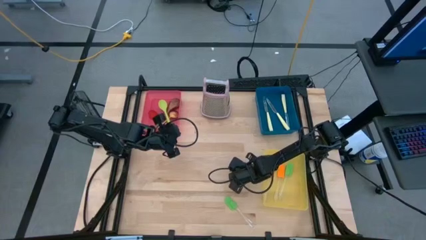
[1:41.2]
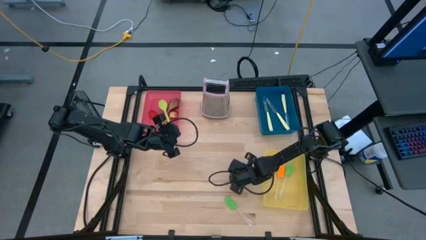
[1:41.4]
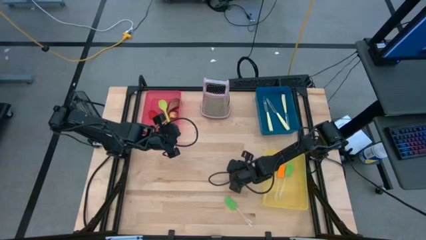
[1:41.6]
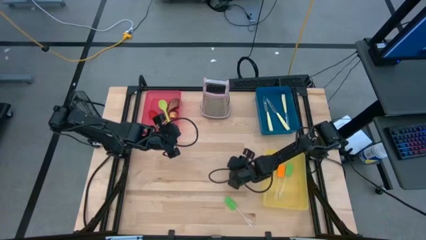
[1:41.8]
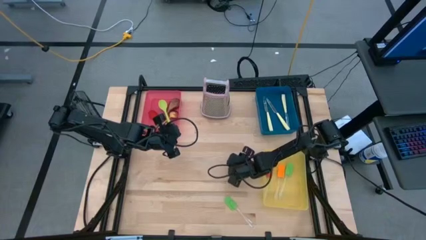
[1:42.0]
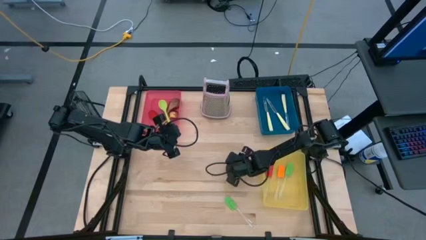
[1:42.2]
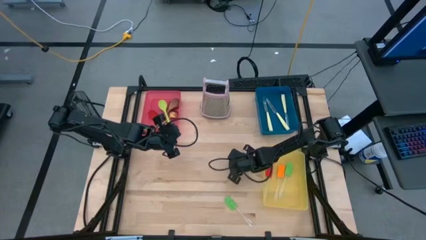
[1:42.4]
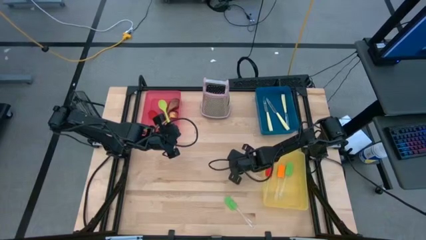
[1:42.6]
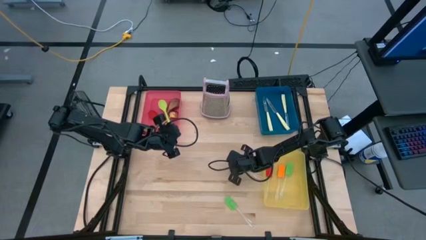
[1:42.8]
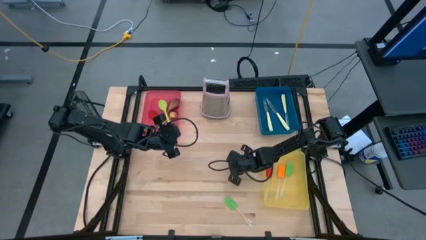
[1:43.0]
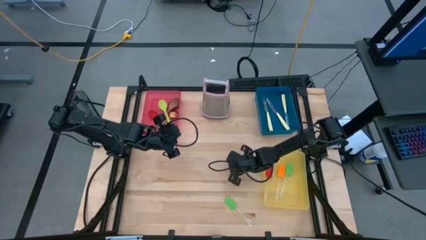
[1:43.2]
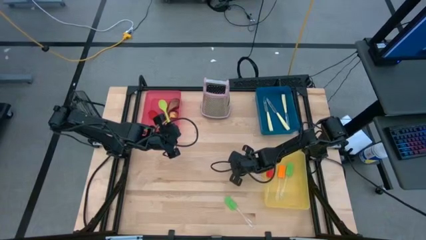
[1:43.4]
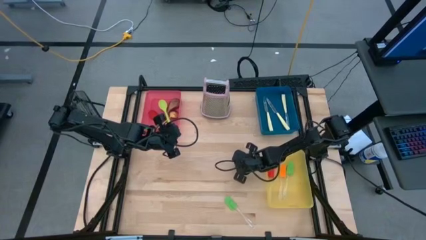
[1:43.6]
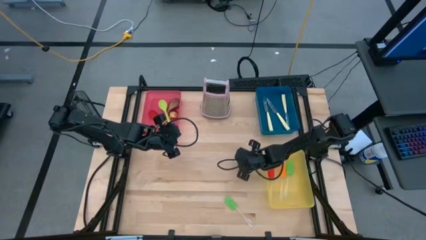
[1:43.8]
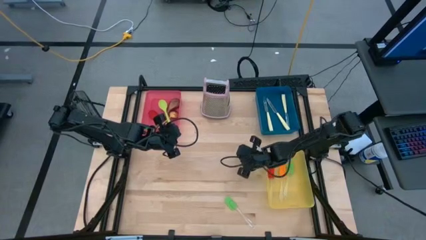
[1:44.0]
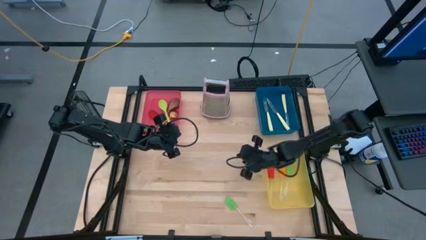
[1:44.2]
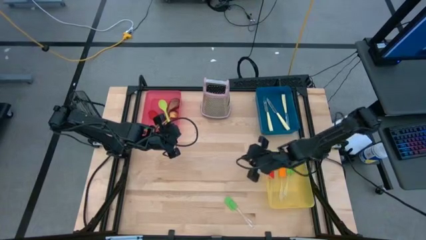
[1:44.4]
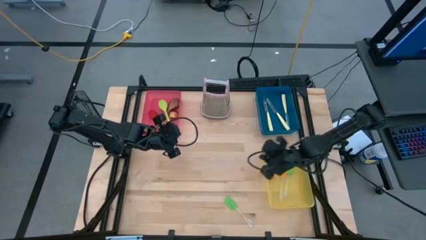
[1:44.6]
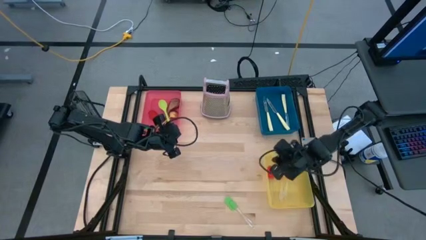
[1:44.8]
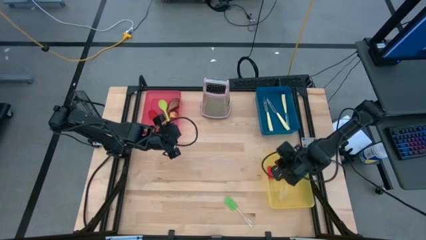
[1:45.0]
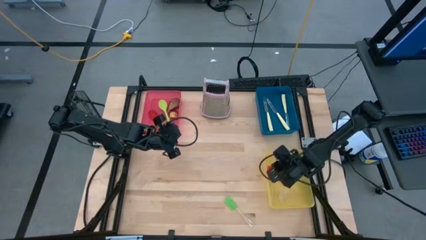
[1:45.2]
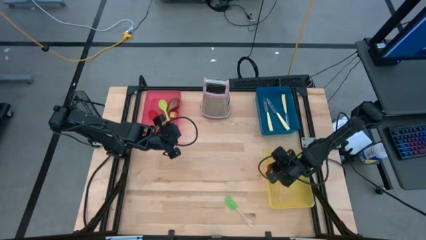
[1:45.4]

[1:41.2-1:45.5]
Task: Pick & Place Kitchen Items
Put the yellow spatula into the yellow bin

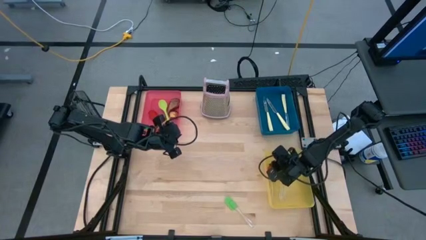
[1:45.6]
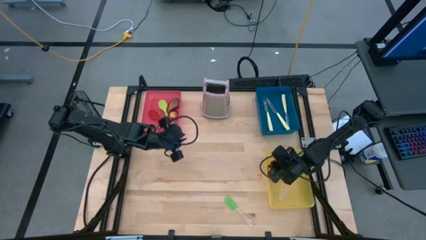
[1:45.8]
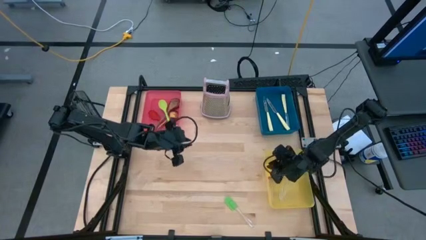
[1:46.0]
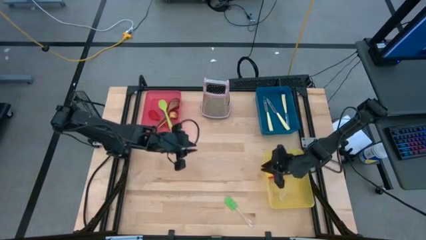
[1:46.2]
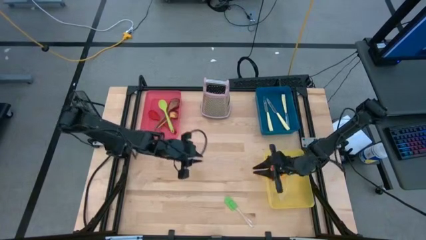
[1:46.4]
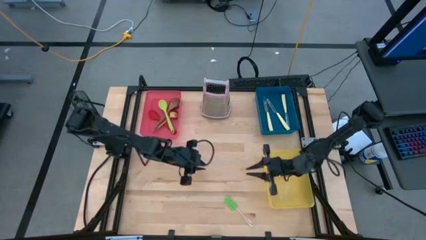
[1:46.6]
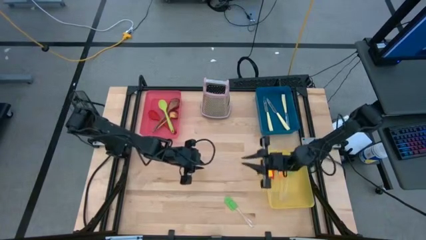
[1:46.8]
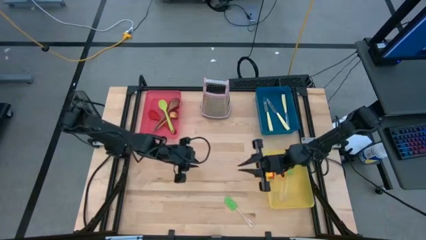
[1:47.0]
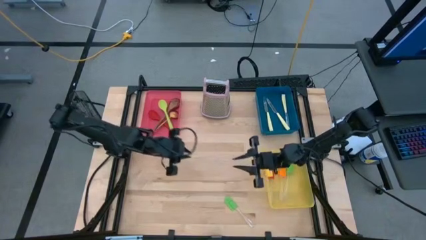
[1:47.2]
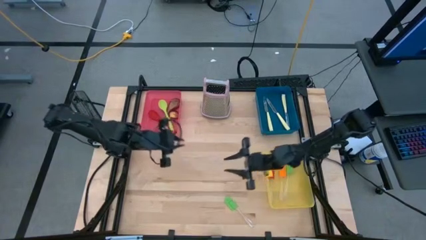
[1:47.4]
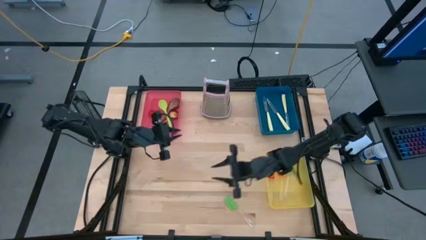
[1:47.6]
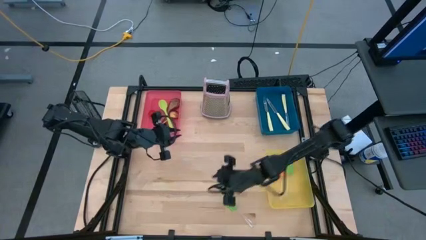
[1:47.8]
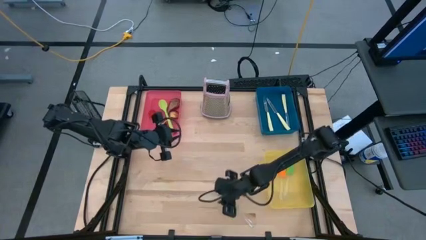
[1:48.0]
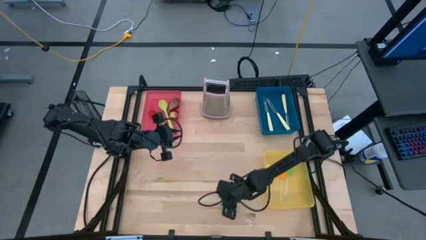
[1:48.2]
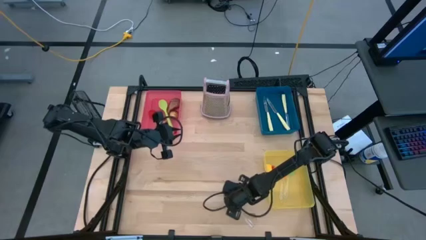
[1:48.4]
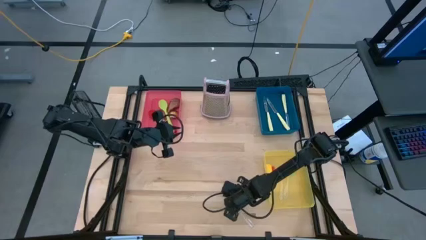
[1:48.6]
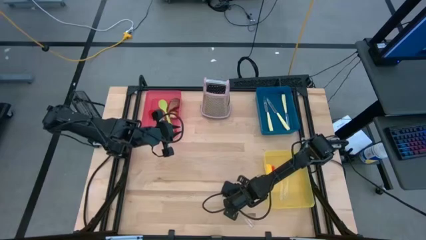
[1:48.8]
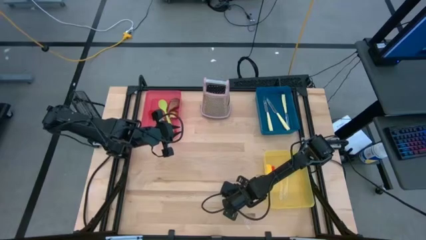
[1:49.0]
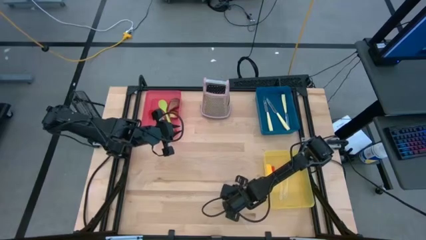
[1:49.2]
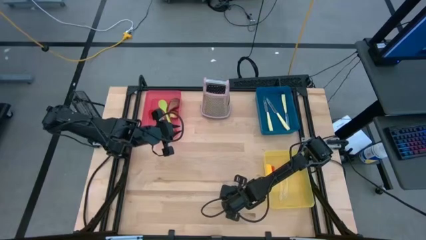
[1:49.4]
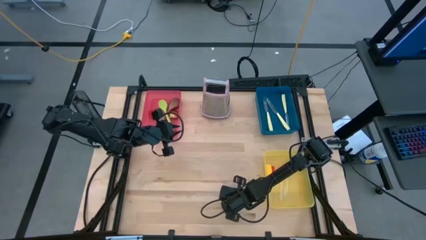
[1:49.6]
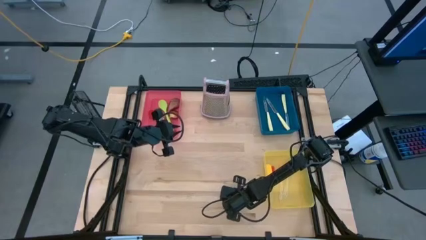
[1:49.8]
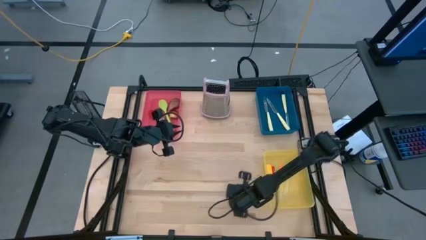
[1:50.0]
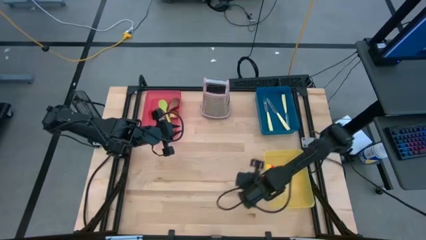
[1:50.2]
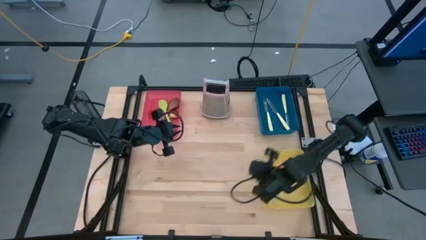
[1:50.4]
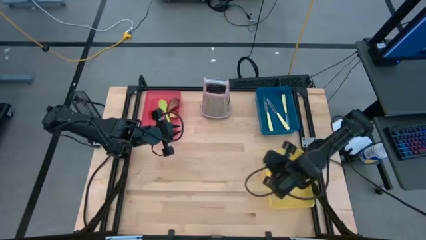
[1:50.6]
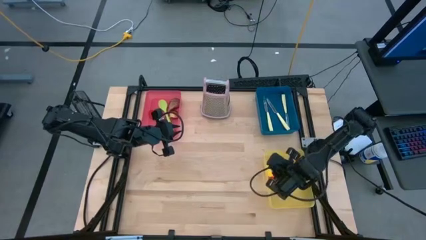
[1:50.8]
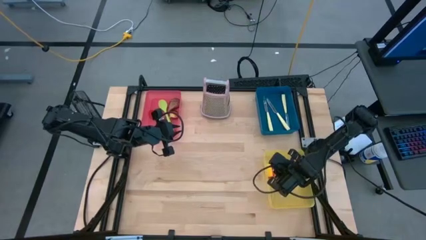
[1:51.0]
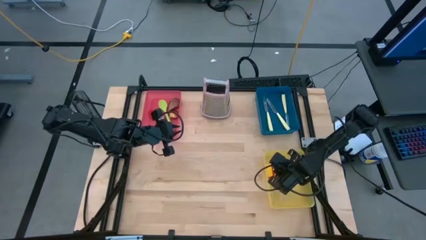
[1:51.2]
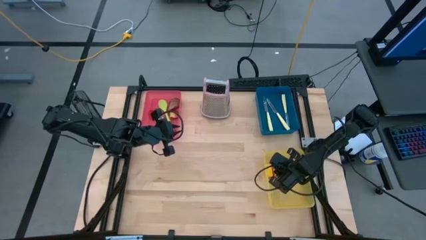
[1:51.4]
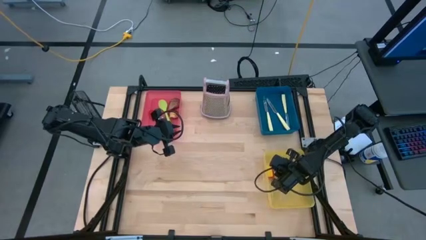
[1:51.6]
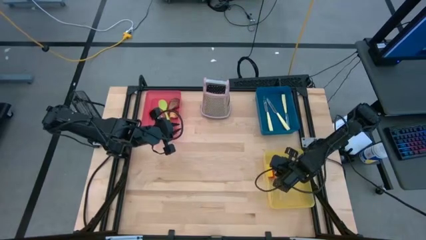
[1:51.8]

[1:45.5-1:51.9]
Put the green spatula into the yellow bin

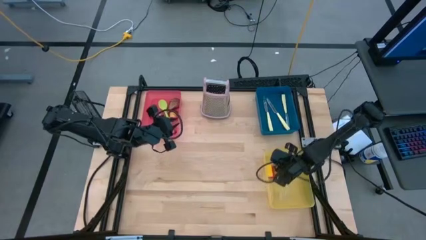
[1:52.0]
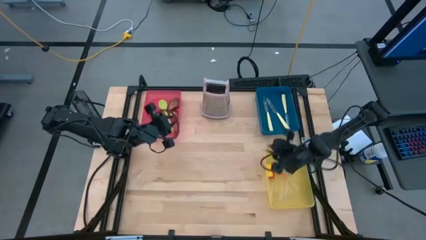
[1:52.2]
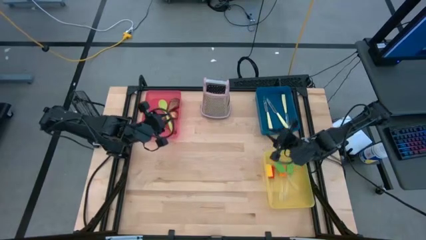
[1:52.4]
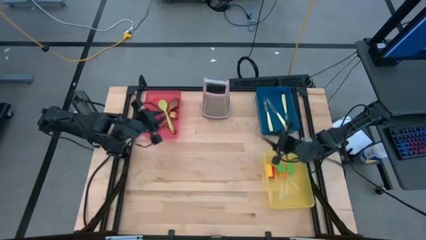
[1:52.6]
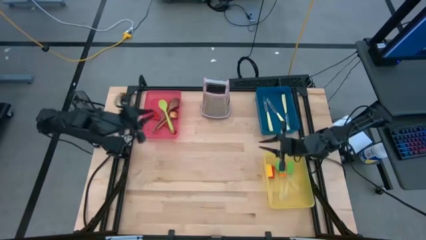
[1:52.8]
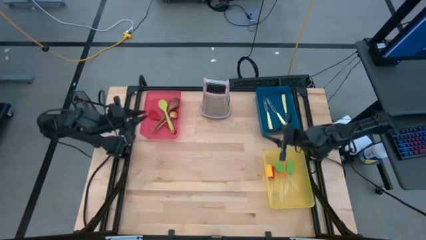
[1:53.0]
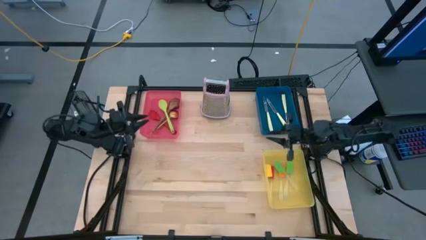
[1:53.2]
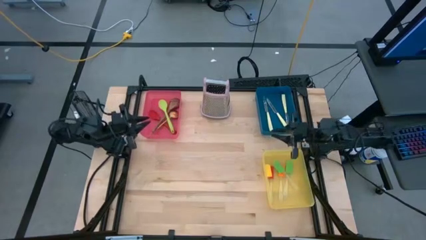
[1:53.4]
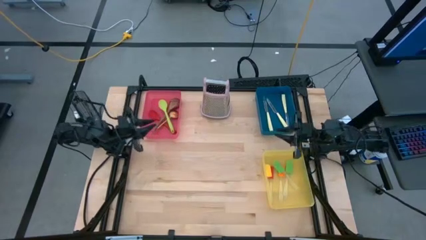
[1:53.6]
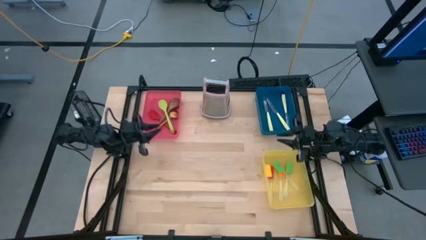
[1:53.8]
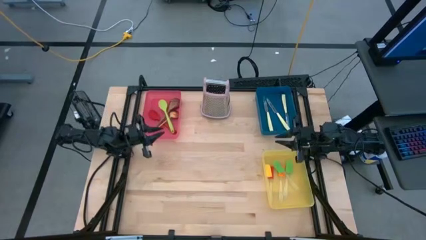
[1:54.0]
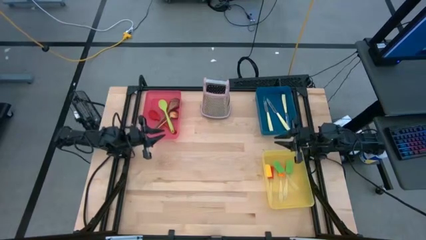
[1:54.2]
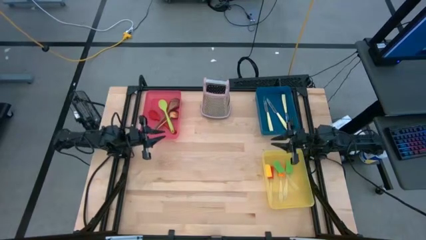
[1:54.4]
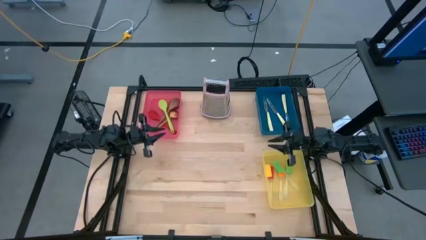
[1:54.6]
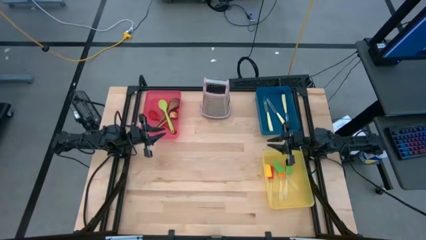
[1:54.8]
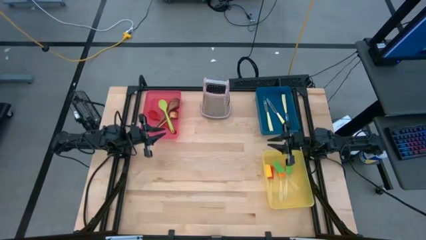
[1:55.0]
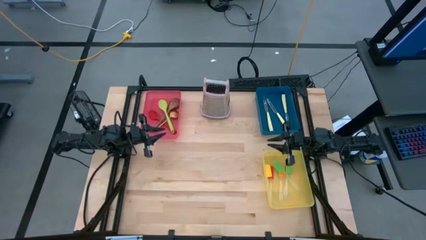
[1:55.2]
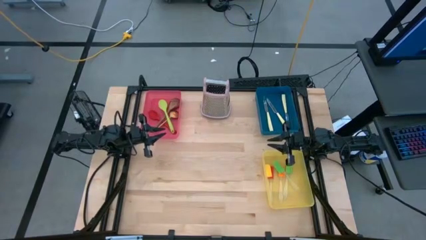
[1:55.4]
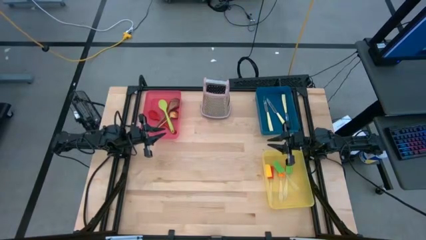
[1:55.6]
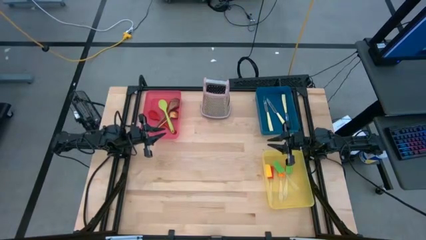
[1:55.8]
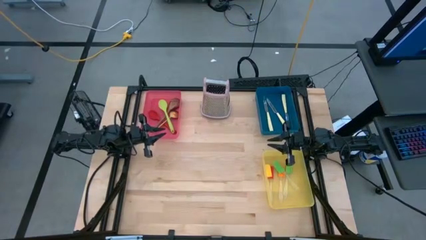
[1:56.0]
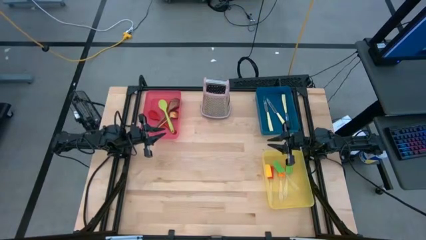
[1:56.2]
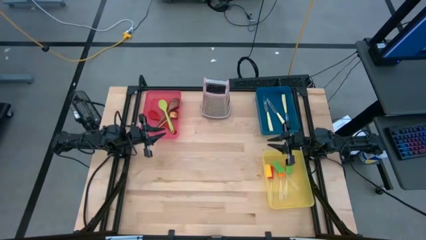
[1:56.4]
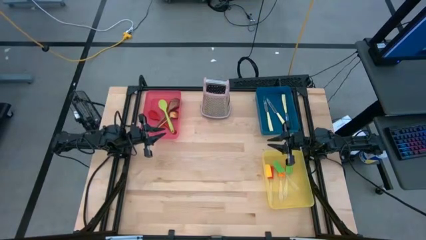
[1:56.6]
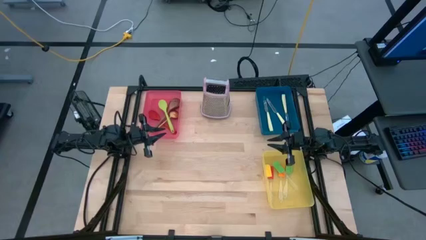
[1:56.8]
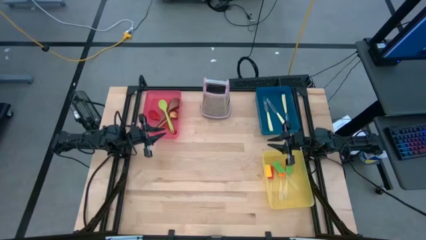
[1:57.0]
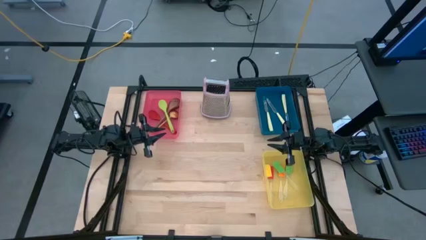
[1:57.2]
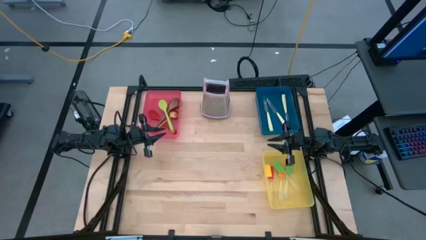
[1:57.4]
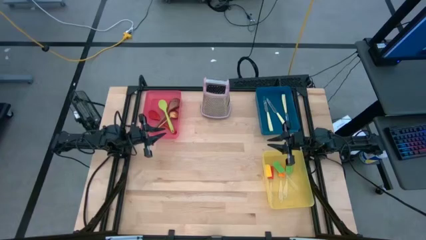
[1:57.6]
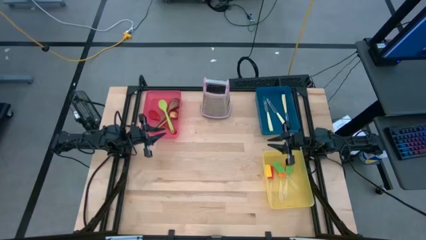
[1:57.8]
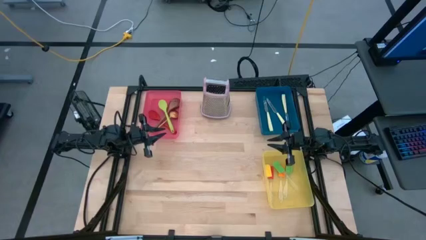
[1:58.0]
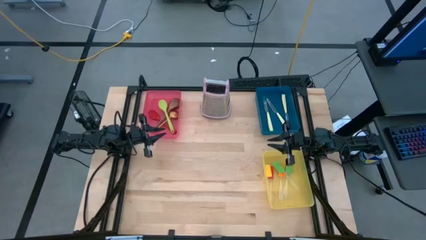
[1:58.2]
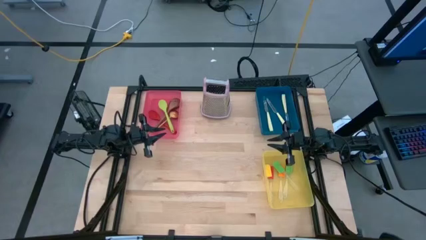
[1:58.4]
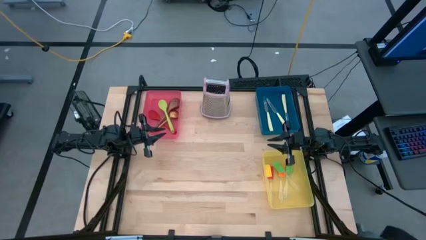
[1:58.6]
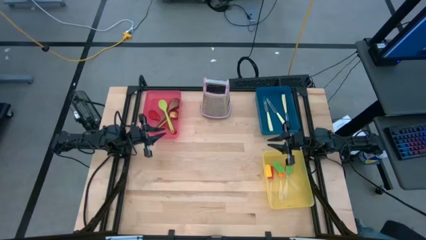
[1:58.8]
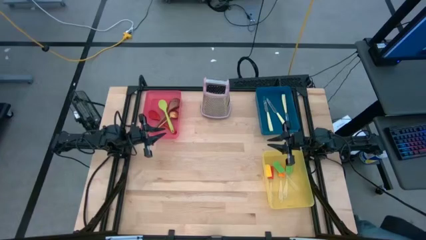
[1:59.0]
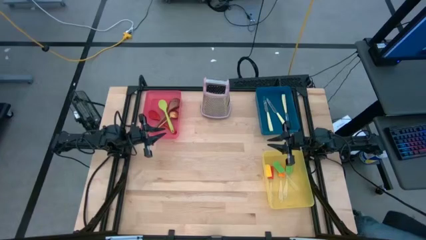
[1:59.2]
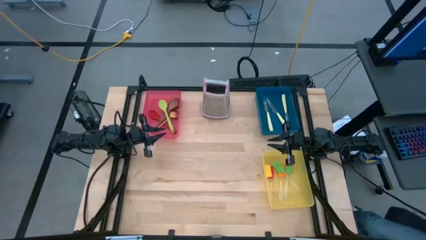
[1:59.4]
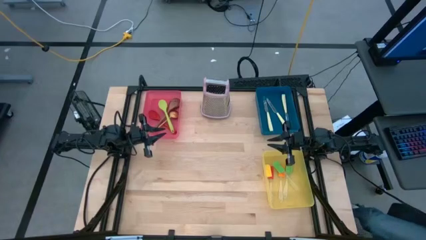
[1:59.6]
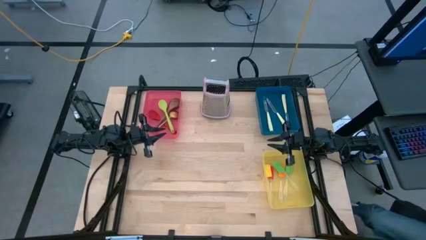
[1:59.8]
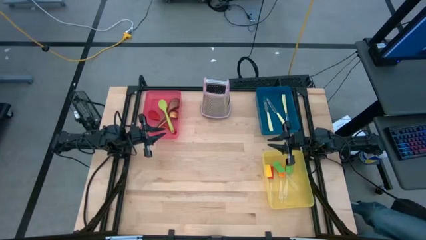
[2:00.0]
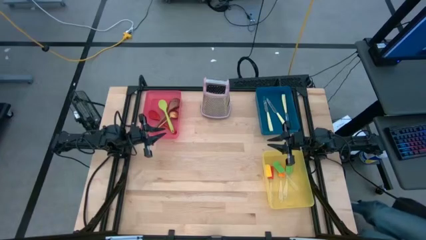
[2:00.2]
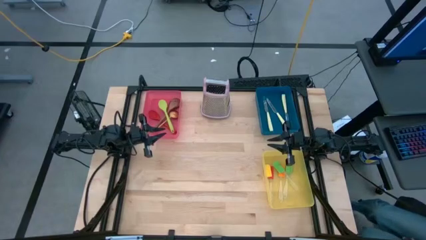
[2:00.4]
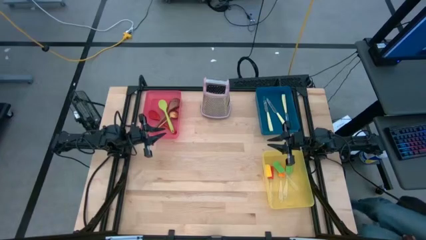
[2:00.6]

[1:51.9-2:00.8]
Return to Home Position
